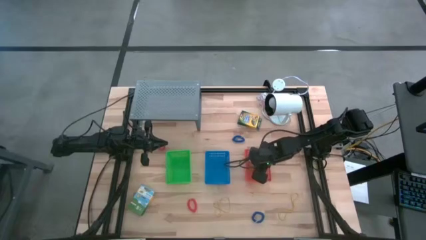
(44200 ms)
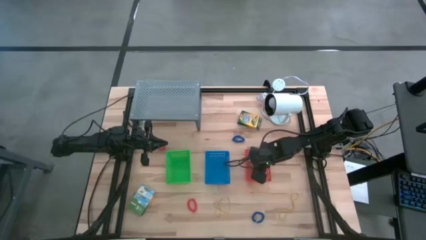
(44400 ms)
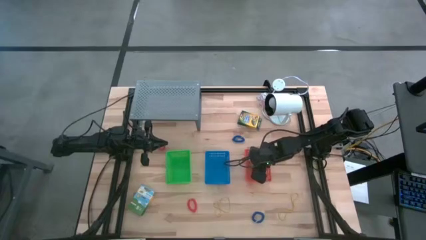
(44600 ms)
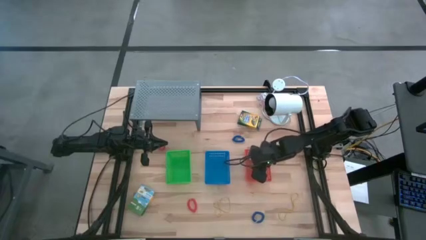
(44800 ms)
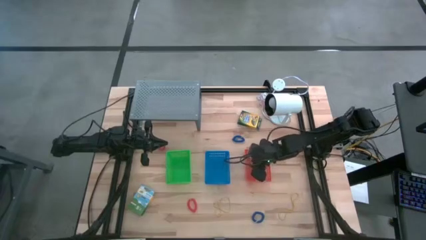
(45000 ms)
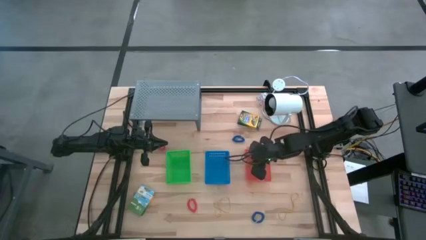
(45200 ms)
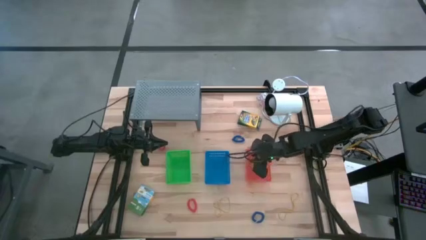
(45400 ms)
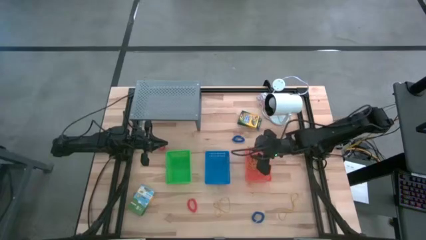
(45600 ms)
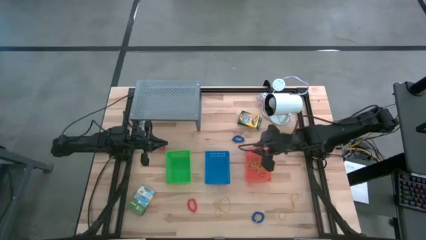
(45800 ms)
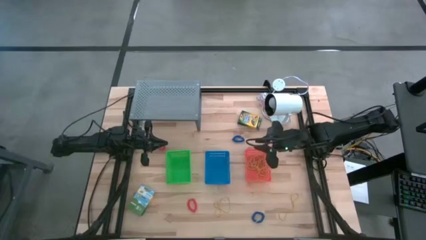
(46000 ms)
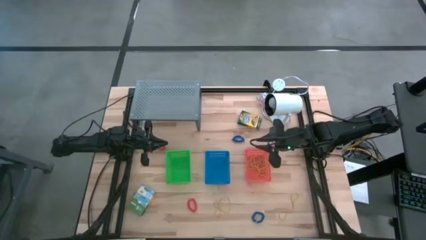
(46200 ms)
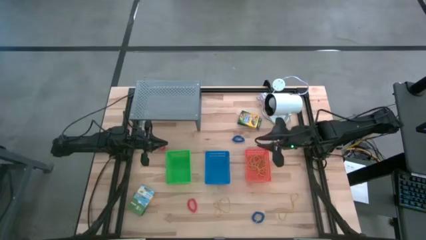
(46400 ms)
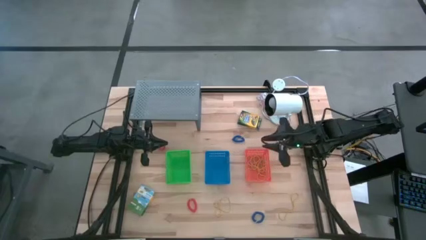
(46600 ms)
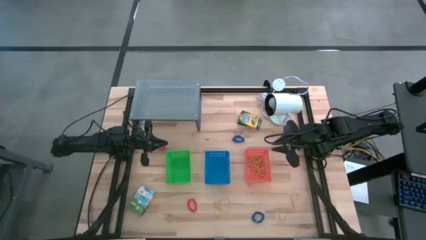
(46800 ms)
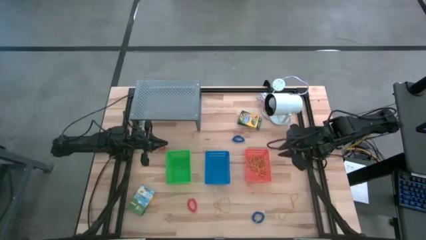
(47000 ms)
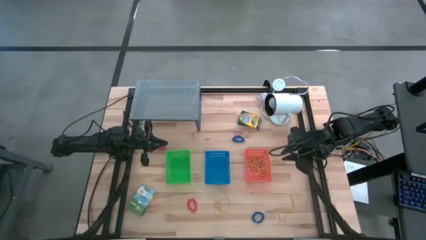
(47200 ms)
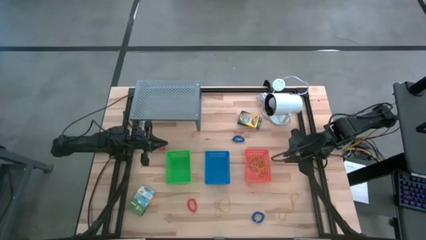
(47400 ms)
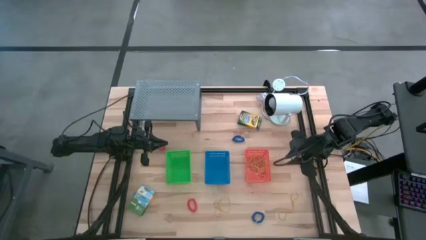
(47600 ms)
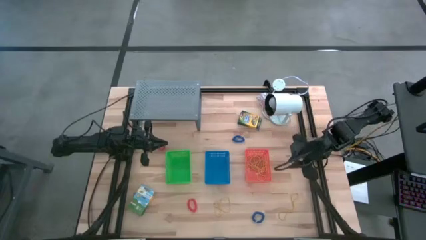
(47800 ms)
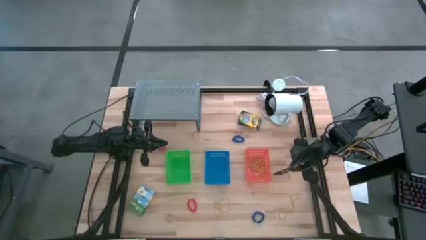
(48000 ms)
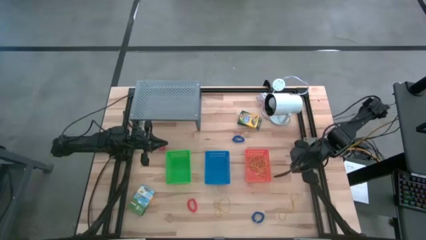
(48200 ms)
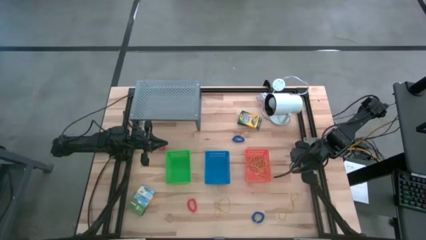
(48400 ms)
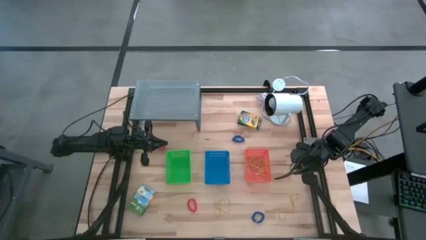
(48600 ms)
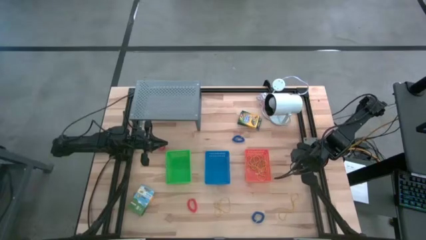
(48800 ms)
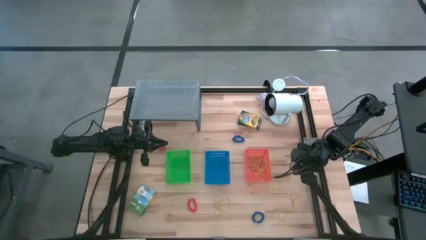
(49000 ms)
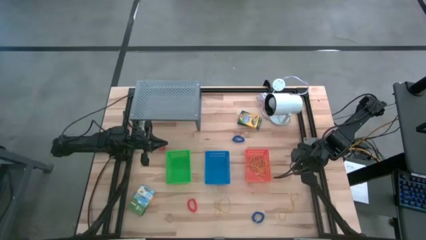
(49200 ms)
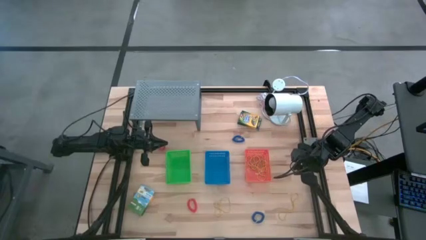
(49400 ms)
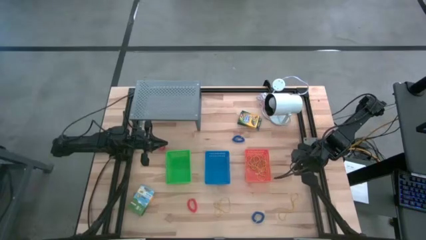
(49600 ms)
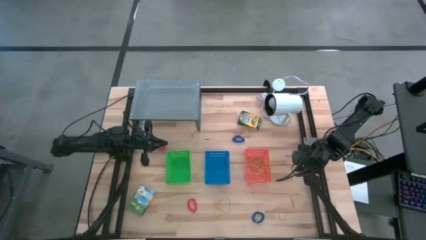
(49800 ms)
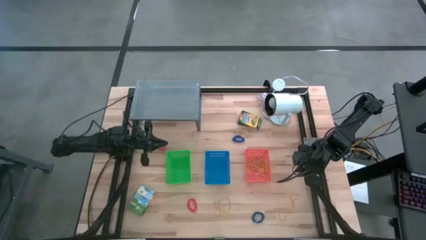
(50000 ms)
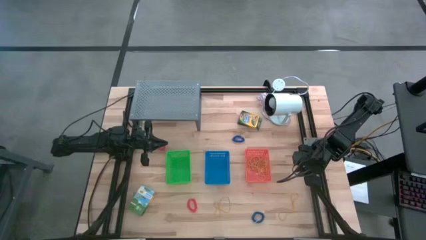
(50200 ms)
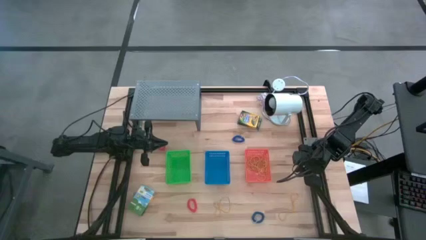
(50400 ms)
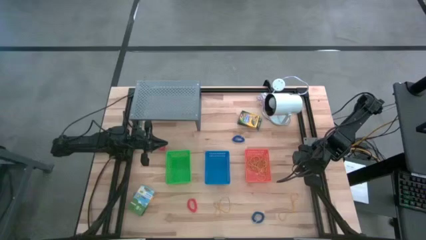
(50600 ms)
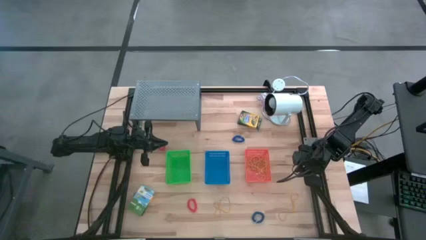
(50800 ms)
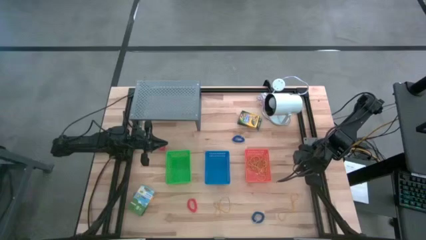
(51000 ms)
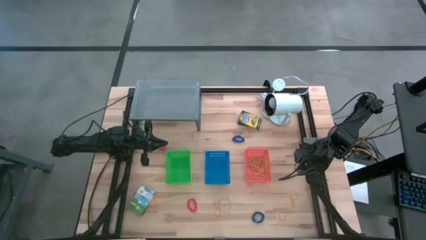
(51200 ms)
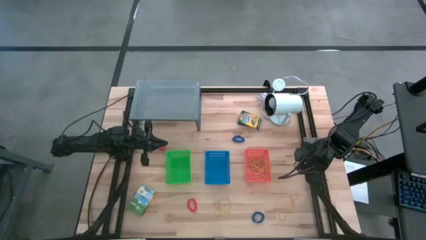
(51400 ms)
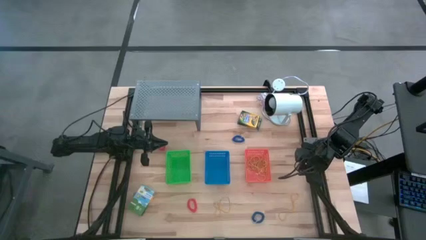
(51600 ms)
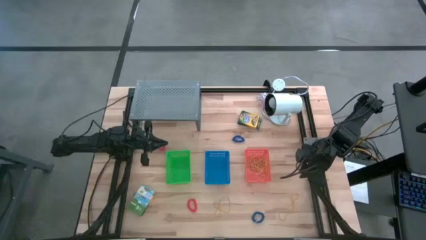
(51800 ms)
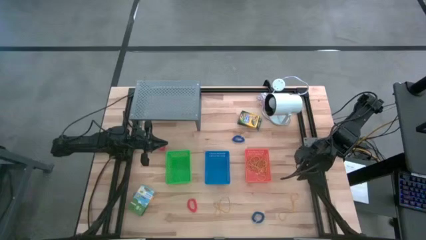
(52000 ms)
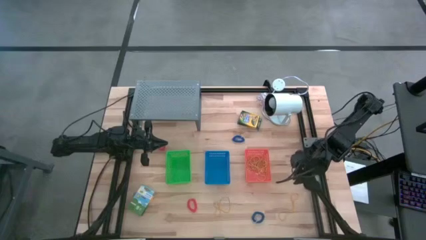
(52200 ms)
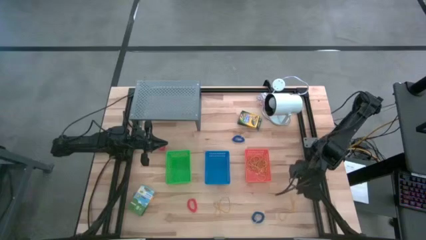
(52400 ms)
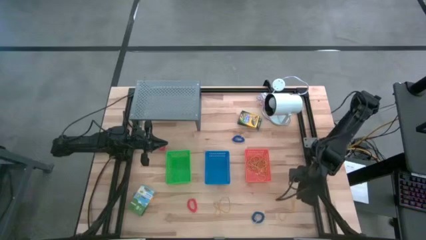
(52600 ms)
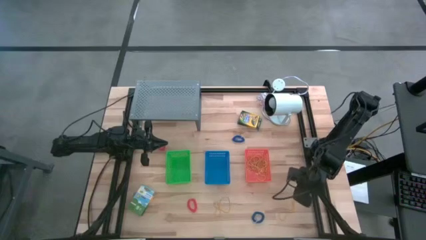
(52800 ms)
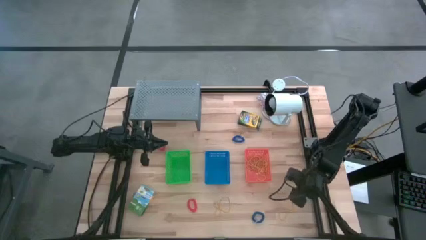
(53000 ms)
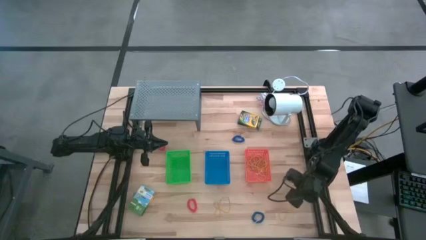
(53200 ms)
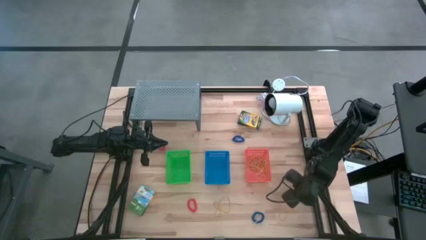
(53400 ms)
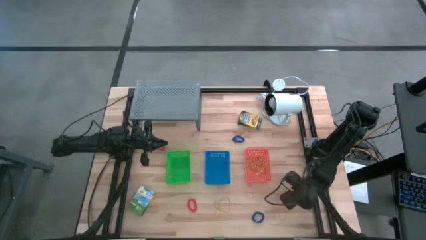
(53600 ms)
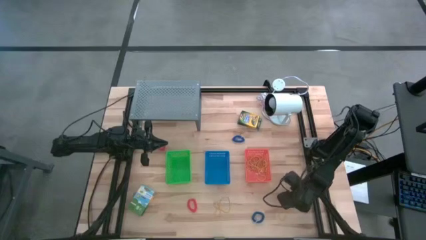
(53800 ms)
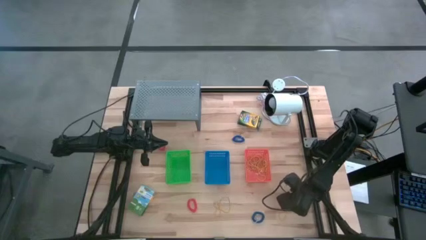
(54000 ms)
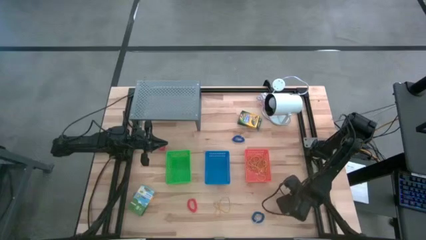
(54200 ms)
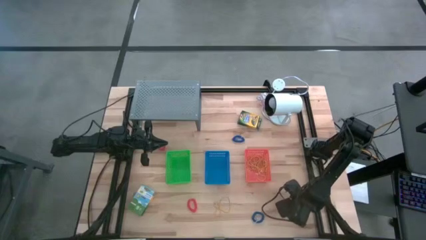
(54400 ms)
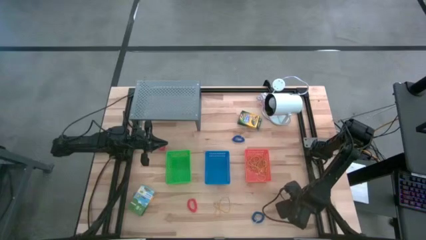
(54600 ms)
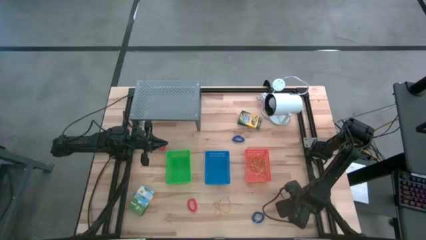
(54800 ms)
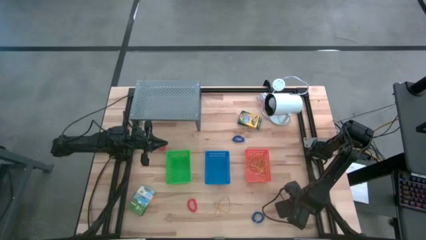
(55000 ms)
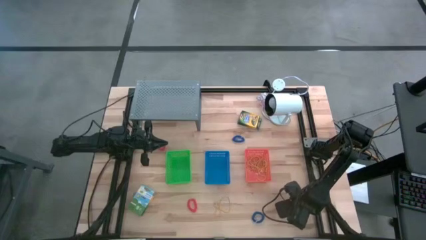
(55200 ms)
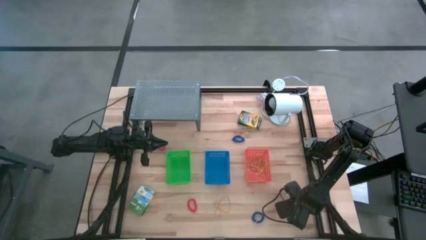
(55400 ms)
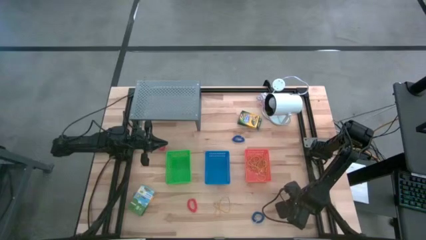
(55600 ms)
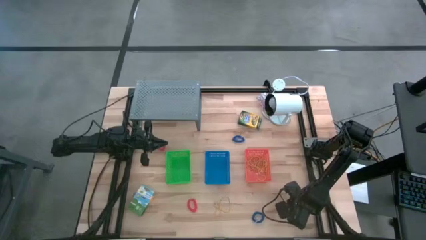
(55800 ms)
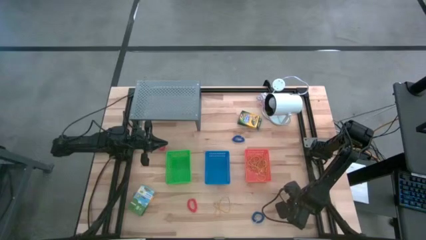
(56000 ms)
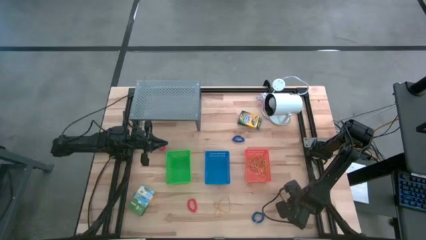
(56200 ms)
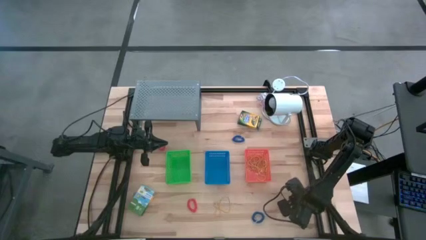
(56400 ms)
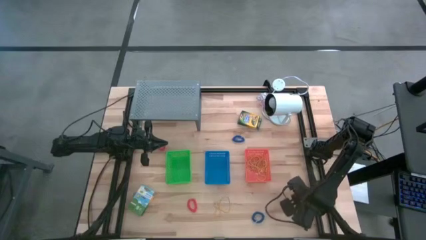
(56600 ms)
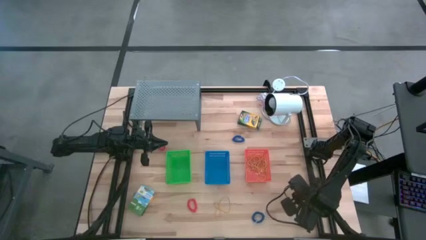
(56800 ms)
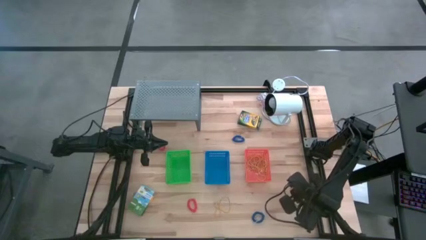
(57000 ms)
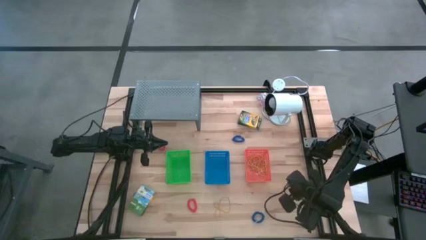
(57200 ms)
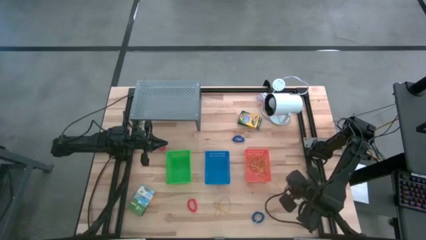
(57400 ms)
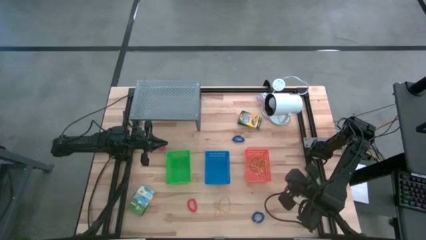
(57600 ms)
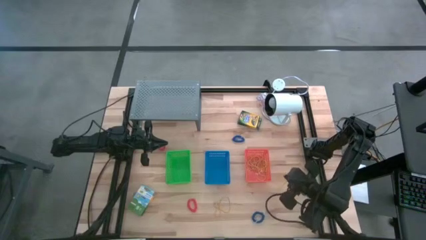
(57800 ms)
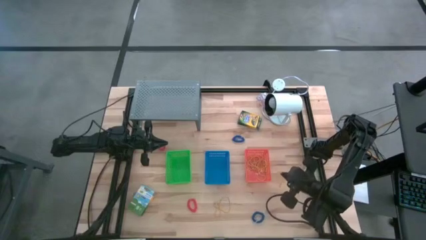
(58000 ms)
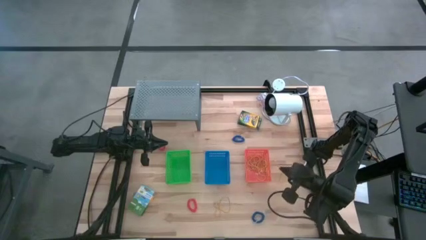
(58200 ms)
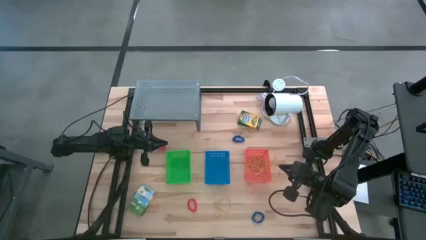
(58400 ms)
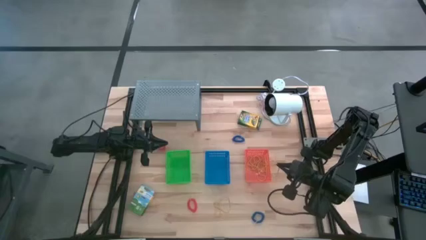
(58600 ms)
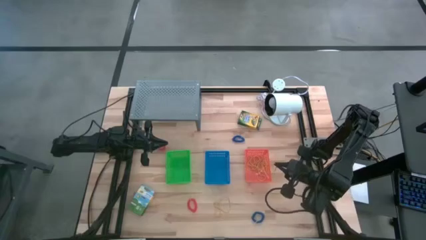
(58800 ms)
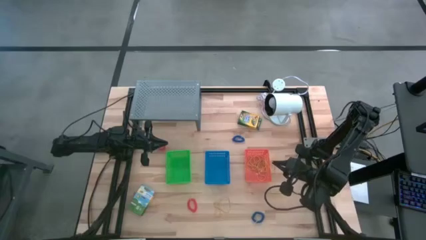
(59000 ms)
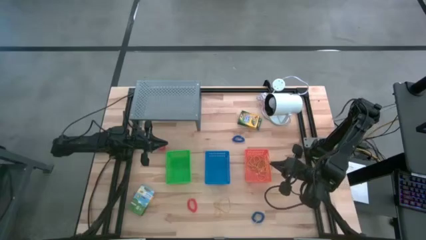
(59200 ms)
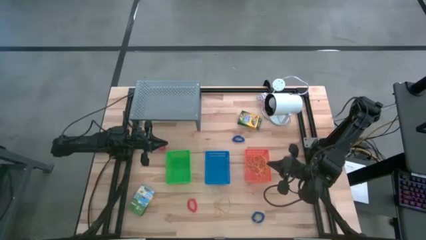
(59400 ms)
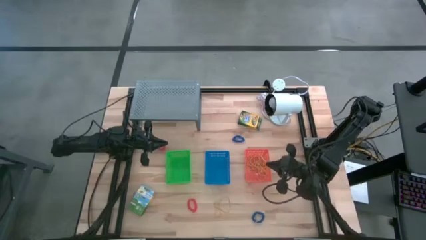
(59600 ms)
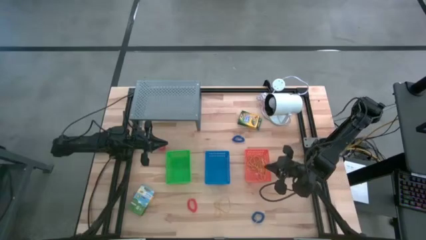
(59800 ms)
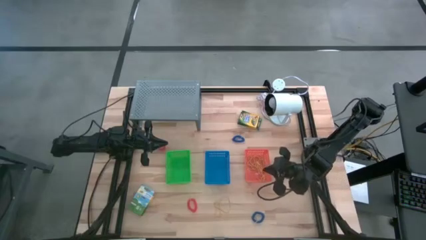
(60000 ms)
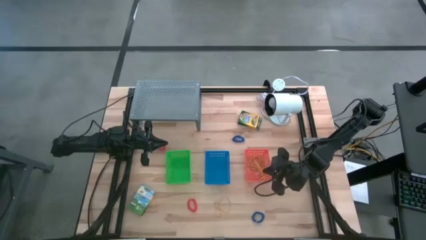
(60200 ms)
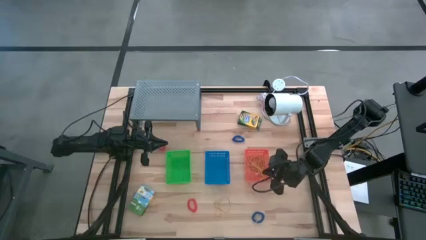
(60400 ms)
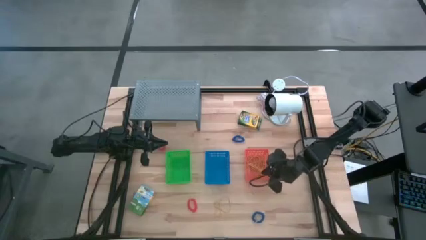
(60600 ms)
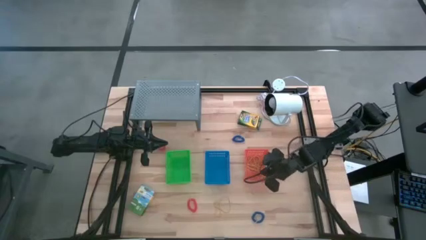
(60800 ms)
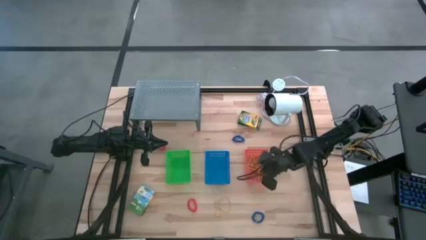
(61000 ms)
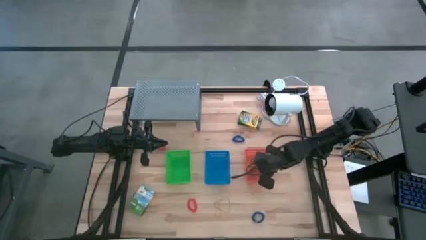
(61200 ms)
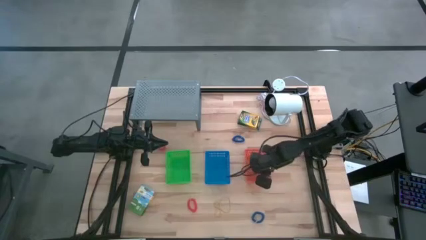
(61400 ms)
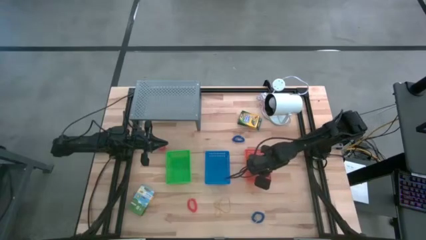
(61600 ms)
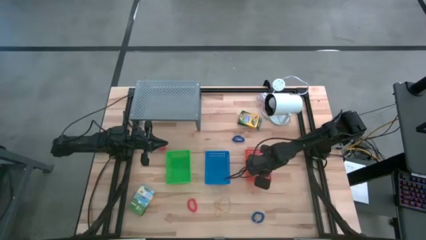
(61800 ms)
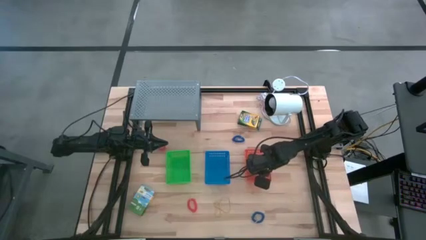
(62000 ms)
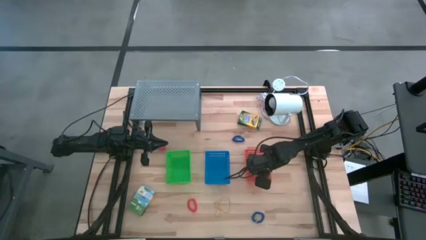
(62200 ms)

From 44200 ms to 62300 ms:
Task: Pick & Place Office Desk Supplies
Put the yellow rubber band into the orange bin
